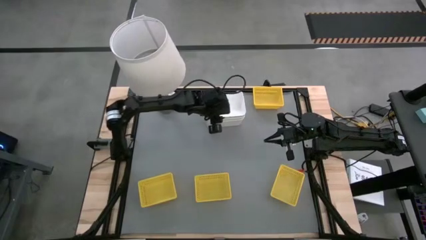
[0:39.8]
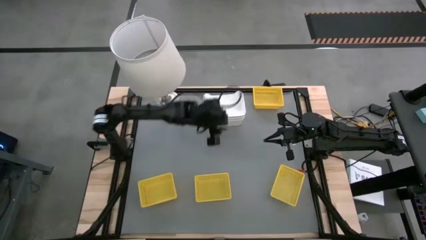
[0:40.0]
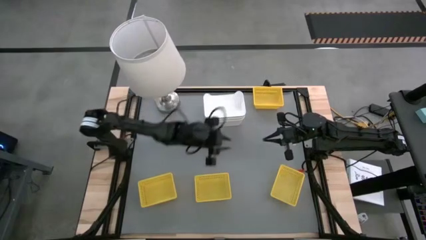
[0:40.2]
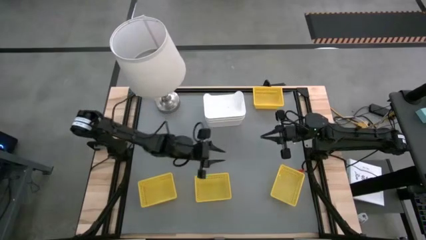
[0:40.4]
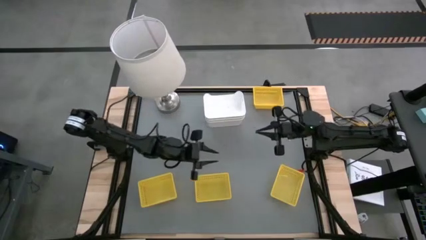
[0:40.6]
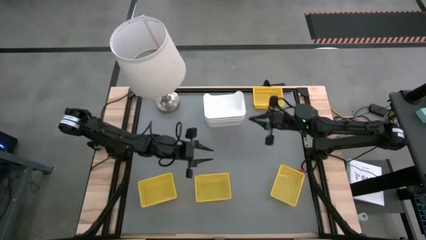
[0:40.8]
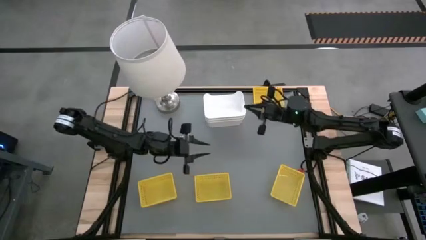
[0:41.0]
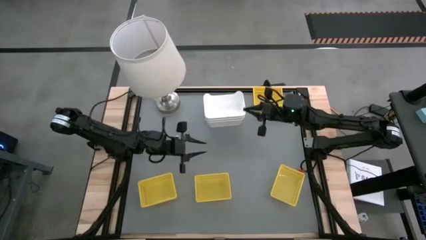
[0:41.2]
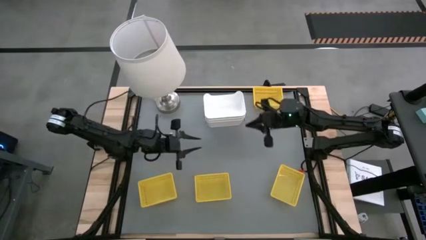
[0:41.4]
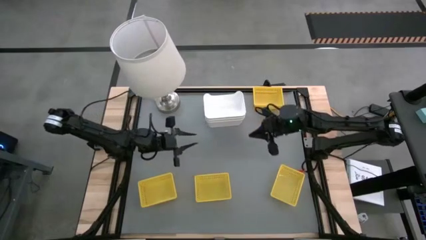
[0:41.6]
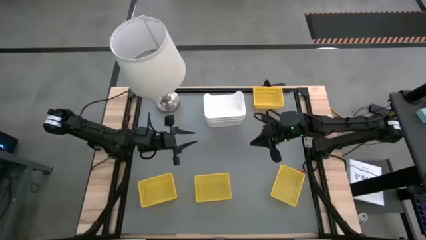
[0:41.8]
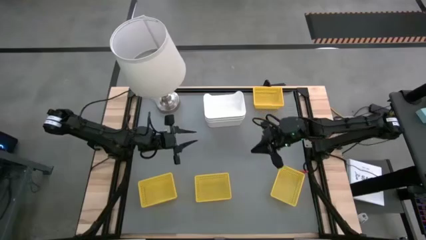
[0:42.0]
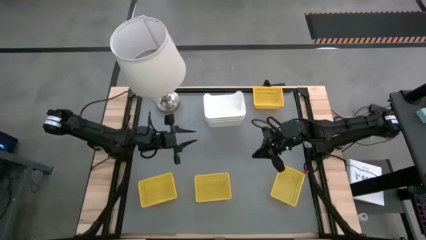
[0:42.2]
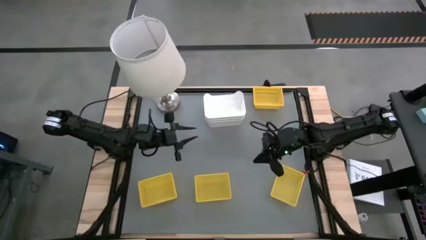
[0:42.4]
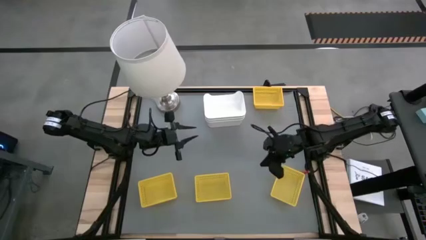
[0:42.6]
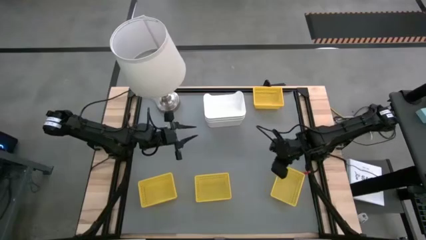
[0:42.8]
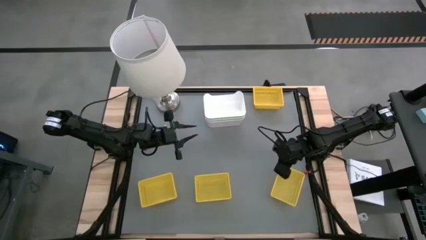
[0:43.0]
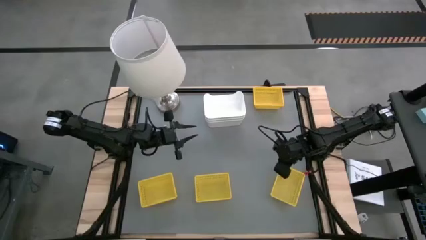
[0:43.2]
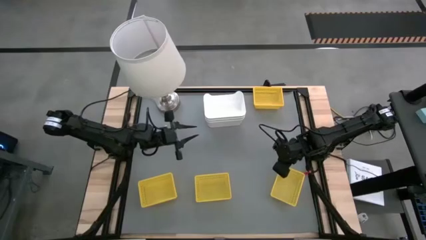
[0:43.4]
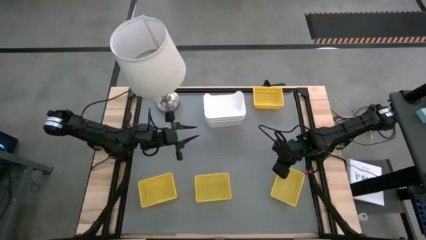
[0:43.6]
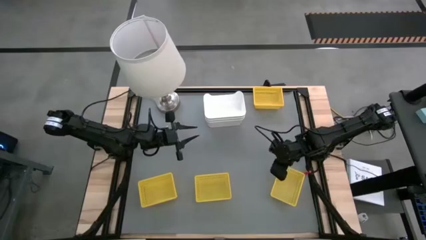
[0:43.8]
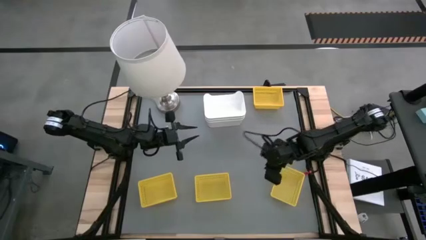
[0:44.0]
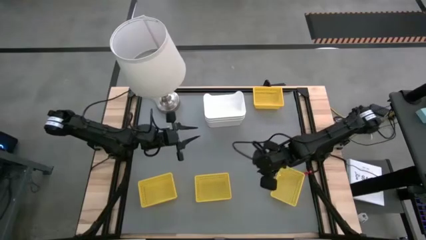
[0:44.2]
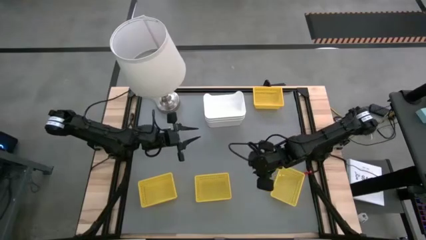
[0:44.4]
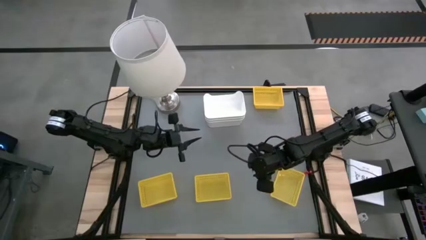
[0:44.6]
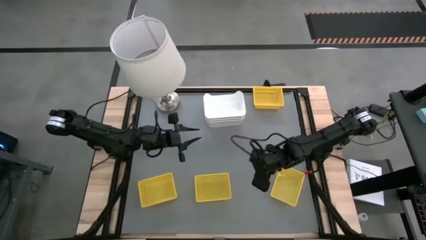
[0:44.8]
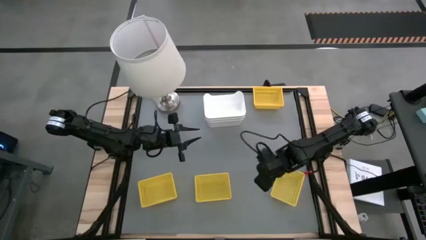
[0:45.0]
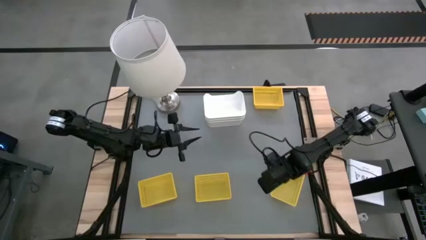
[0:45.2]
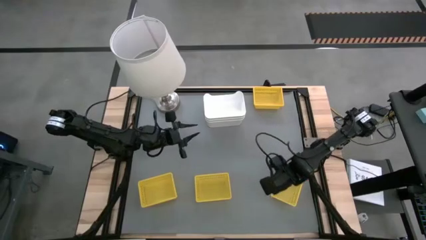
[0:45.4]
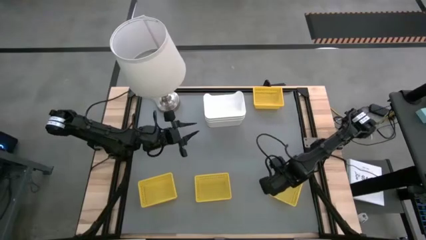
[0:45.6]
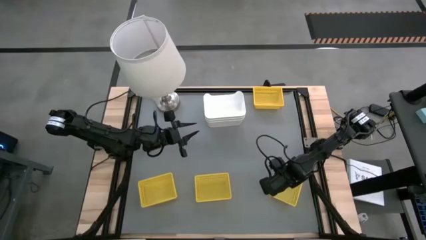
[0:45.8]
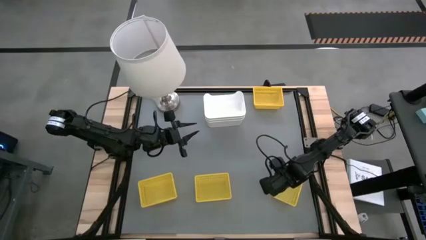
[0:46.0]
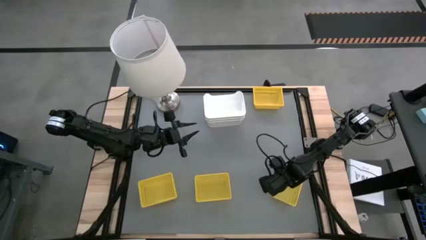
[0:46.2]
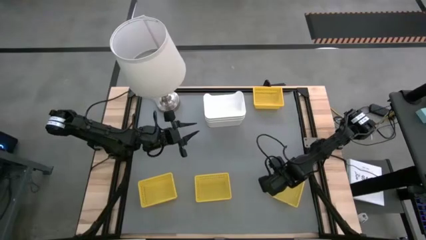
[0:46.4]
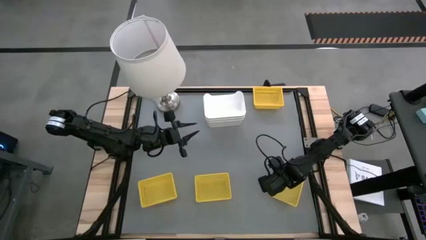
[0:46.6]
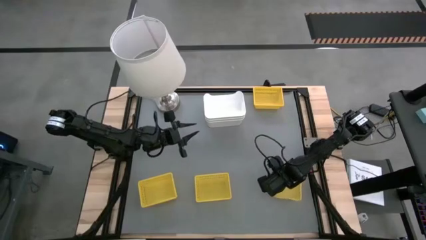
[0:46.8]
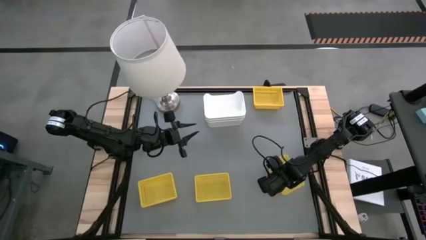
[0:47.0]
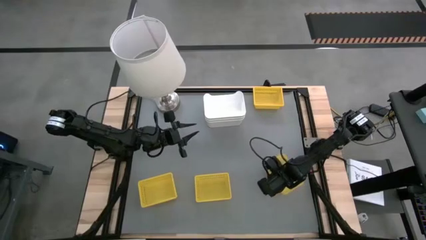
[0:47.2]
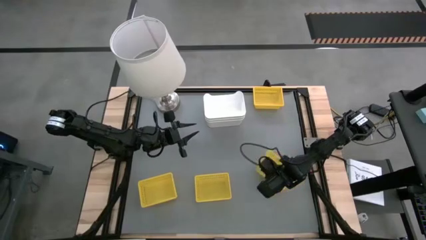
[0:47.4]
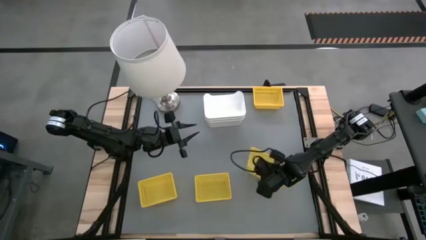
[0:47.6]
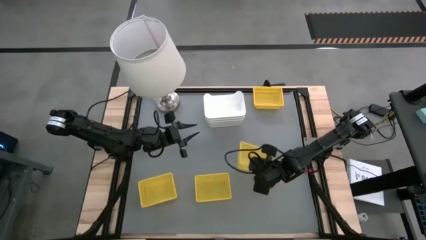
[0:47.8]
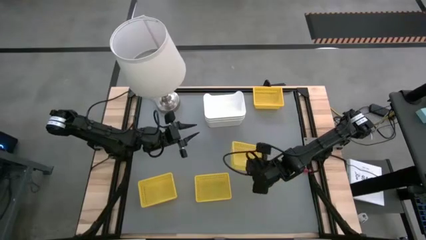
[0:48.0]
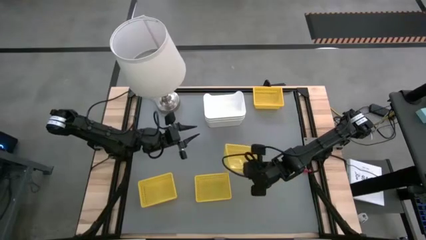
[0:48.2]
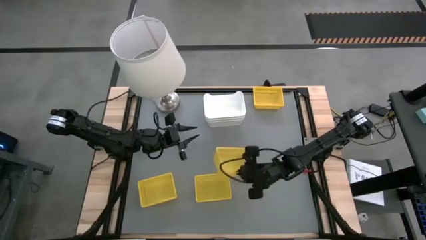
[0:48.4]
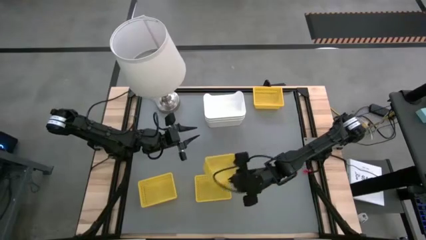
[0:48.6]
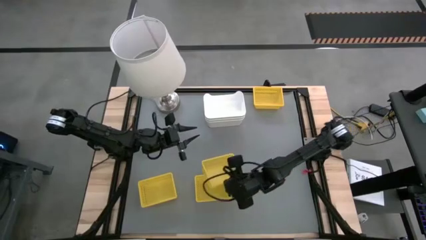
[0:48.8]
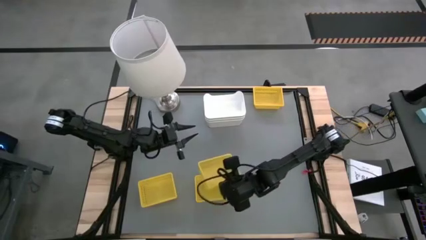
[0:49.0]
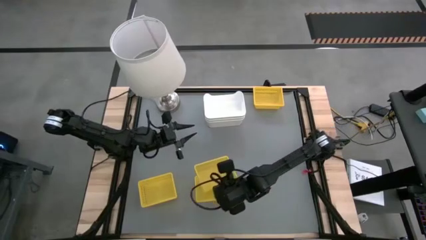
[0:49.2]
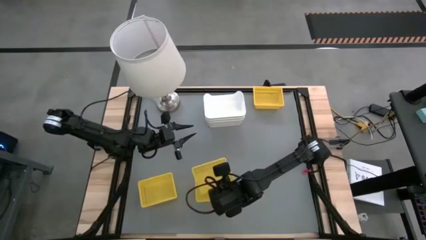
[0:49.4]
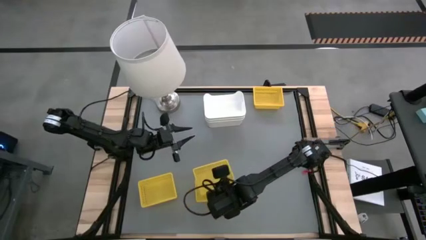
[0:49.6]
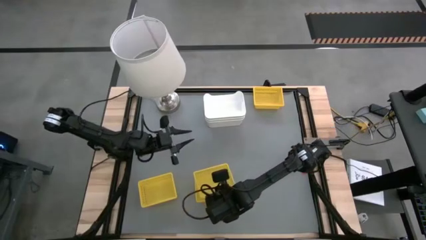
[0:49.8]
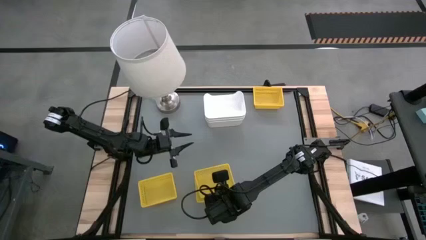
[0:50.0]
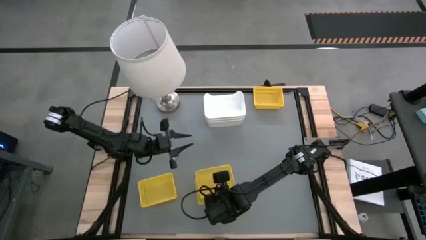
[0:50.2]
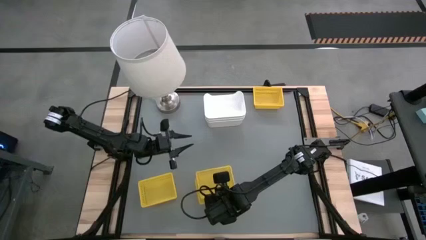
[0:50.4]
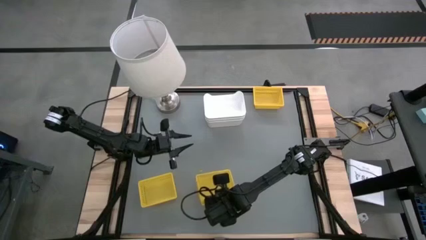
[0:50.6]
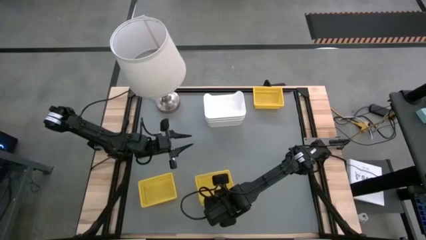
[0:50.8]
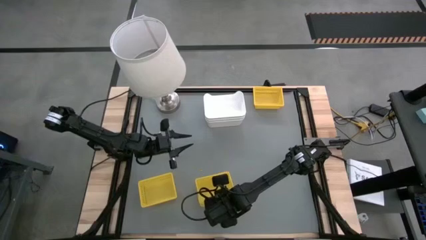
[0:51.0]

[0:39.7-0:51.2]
Stack the yellow basket on the other yellow basket

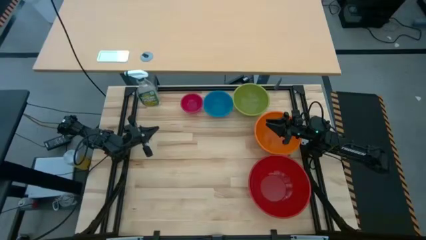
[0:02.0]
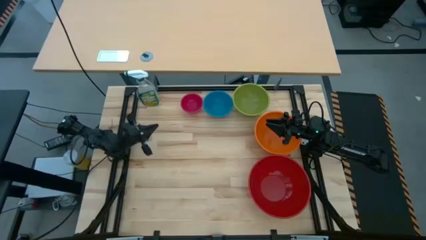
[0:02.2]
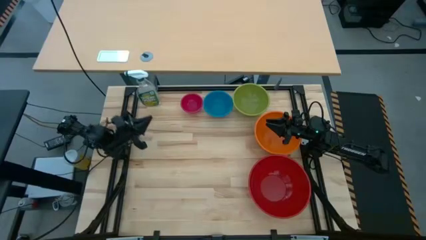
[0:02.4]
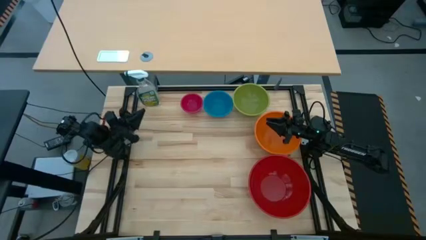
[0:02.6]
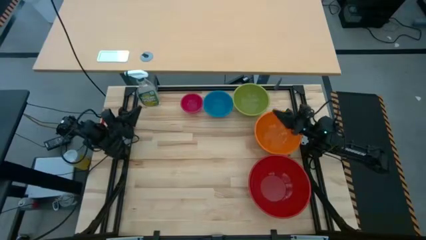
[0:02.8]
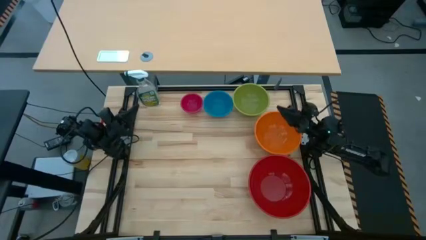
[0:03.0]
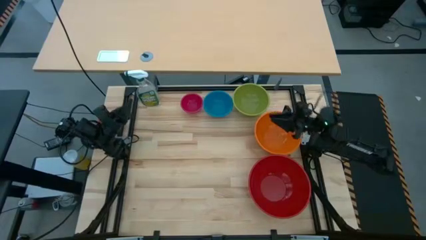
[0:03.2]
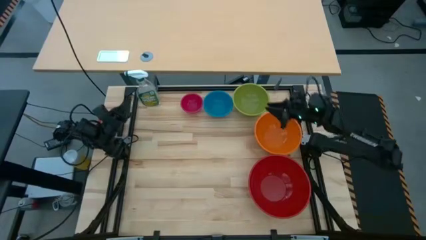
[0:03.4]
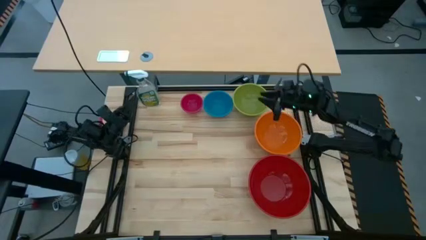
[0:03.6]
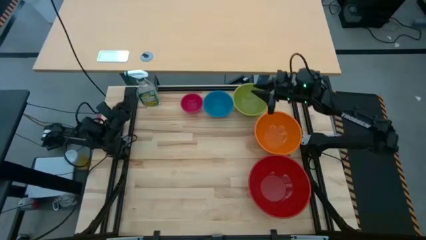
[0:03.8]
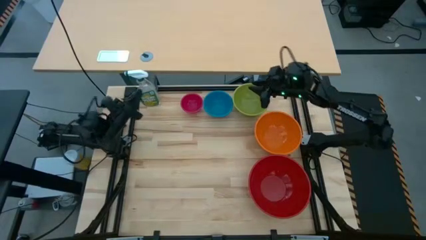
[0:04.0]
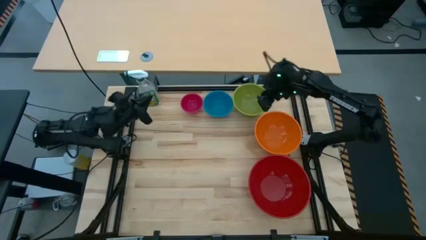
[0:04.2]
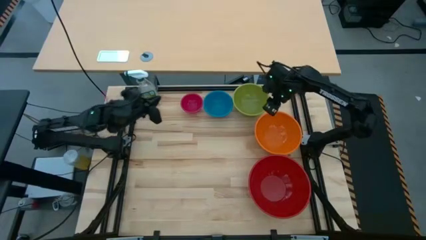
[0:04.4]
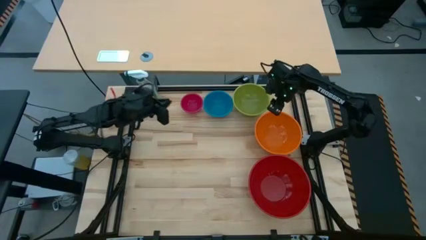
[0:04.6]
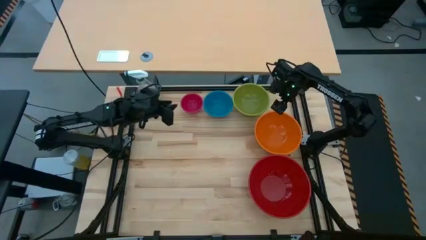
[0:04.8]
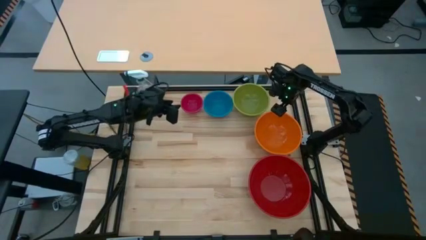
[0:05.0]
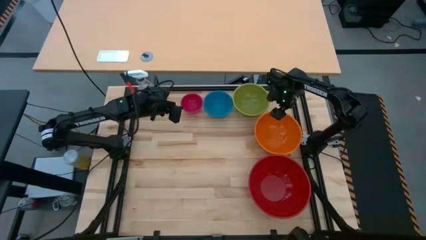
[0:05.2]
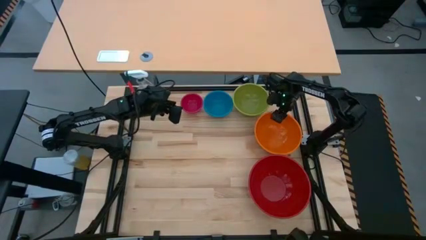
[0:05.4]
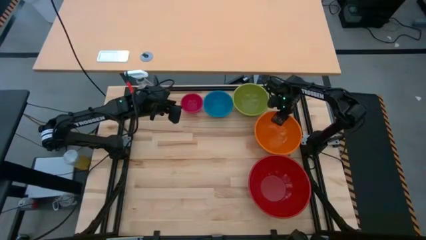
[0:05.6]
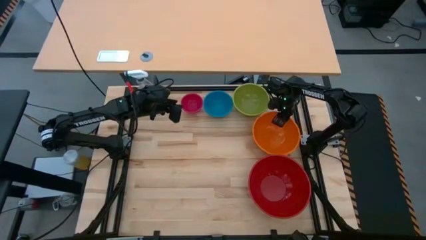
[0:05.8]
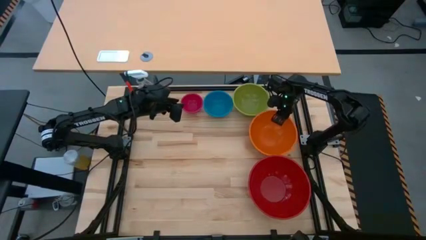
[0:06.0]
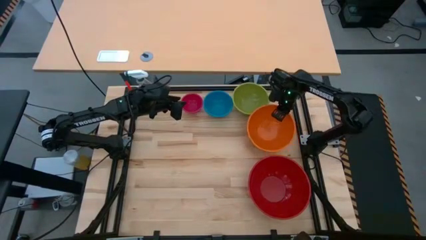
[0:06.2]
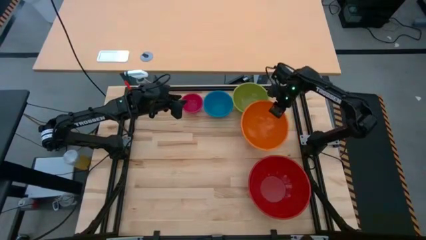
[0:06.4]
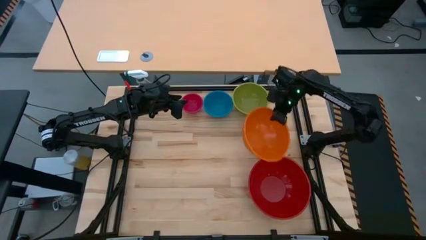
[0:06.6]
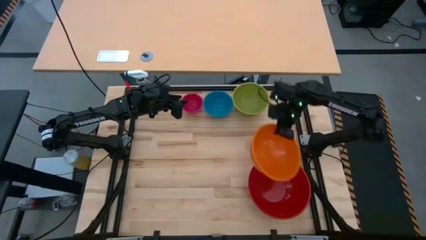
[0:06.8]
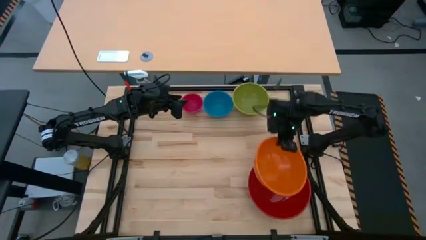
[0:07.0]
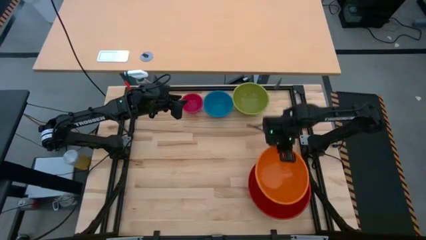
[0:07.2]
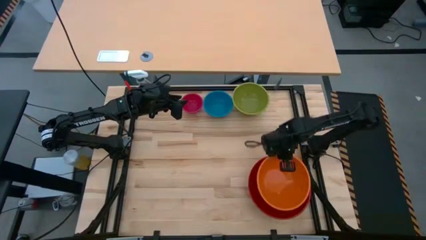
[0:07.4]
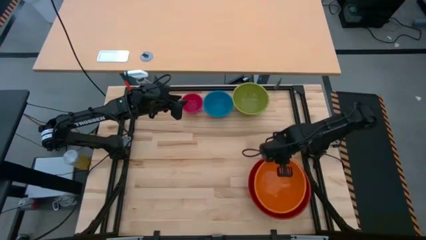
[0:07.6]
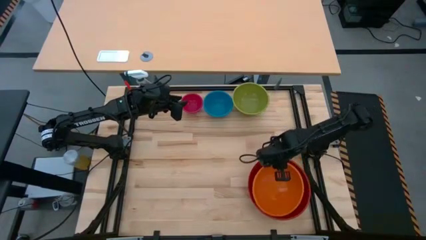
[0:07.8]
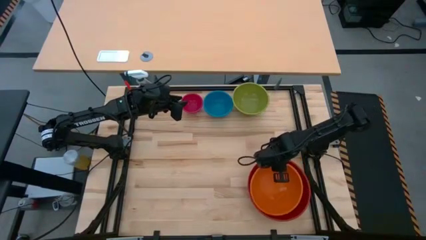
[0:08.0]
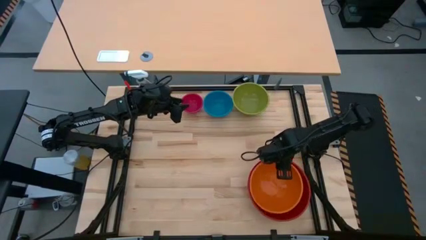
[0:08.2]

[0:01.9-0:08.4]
Stack the orange bowl on top of the red bowl
